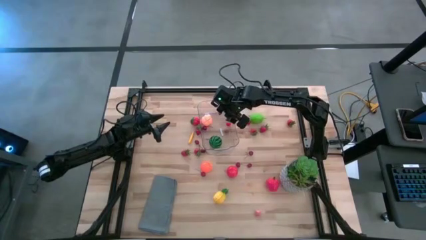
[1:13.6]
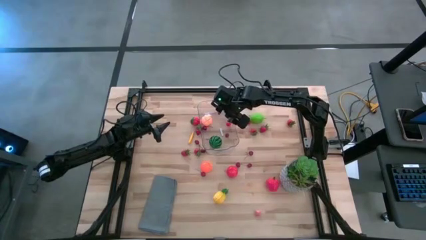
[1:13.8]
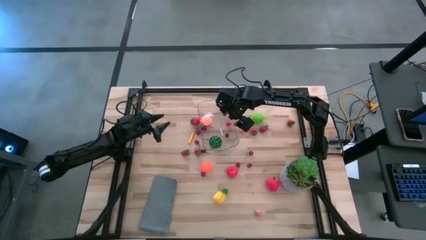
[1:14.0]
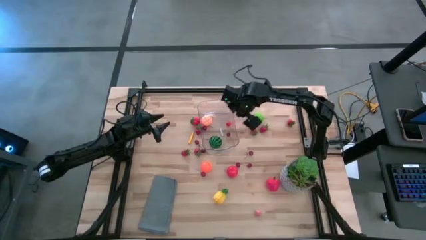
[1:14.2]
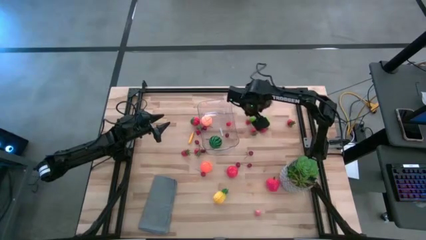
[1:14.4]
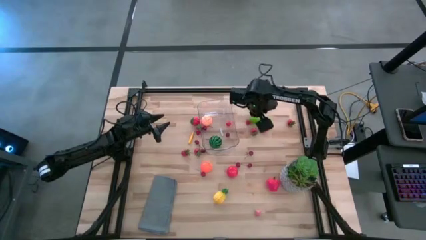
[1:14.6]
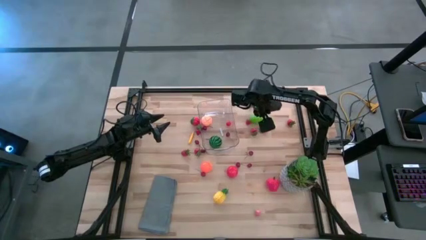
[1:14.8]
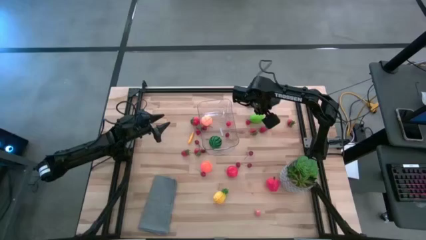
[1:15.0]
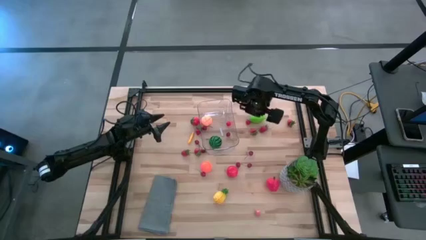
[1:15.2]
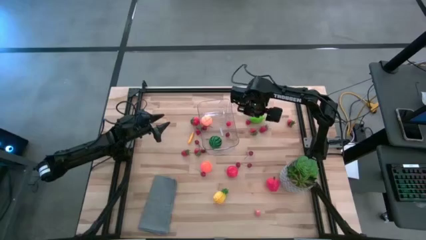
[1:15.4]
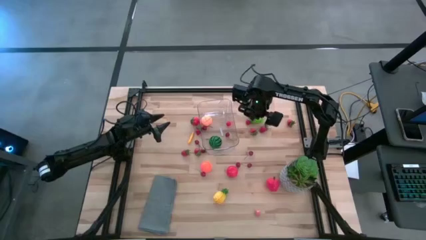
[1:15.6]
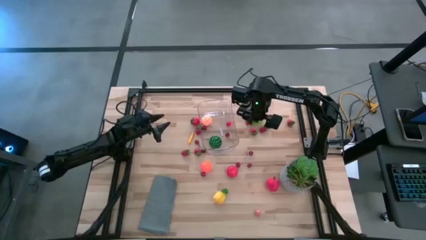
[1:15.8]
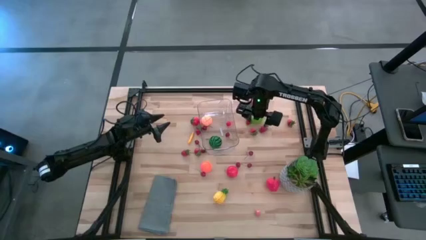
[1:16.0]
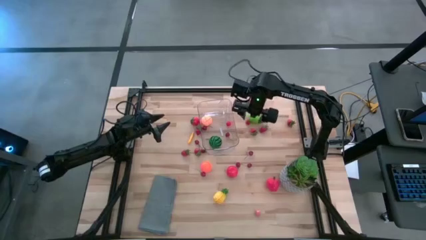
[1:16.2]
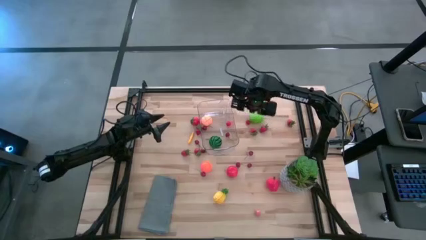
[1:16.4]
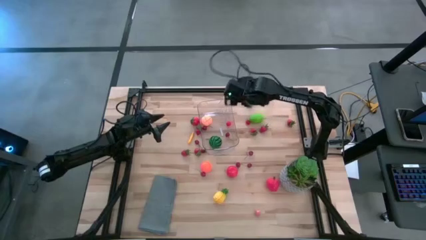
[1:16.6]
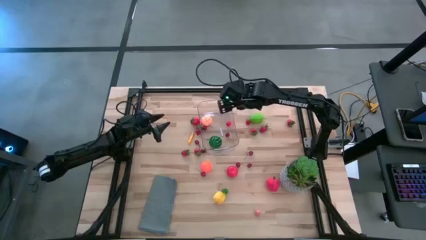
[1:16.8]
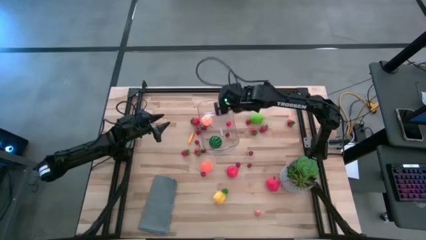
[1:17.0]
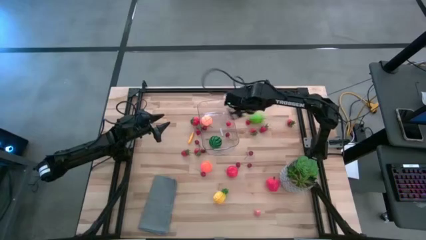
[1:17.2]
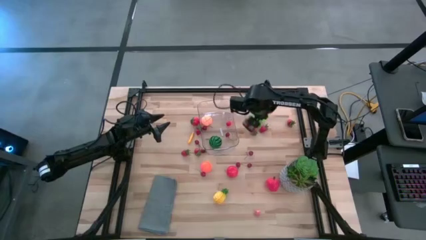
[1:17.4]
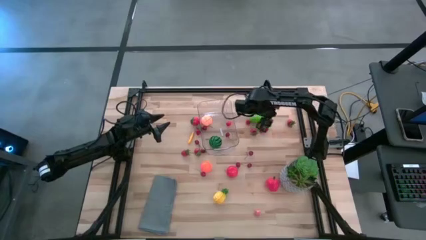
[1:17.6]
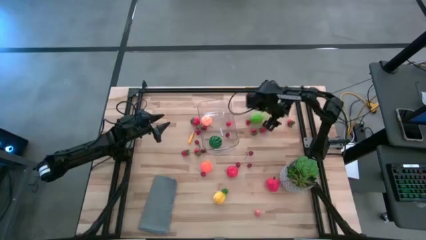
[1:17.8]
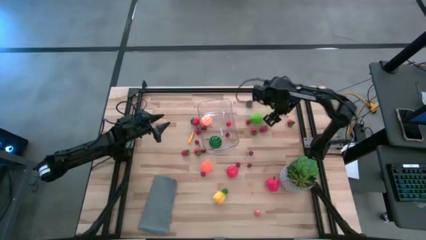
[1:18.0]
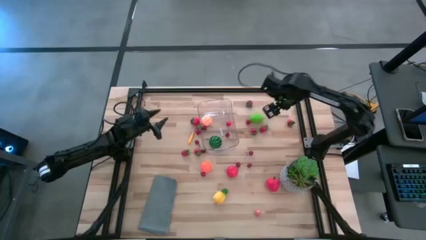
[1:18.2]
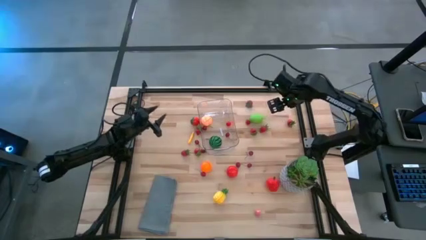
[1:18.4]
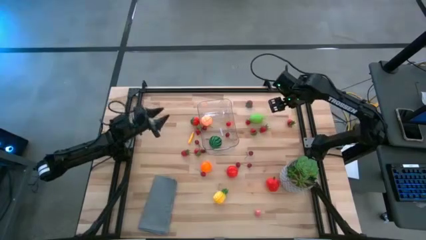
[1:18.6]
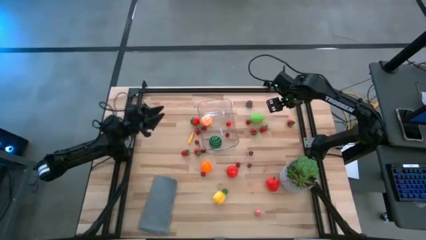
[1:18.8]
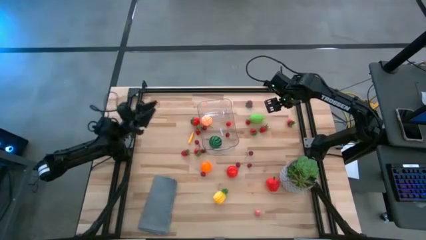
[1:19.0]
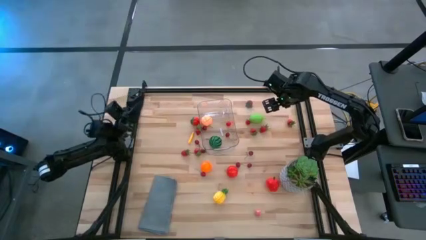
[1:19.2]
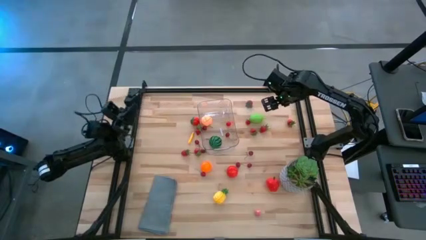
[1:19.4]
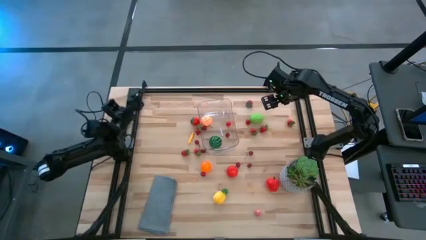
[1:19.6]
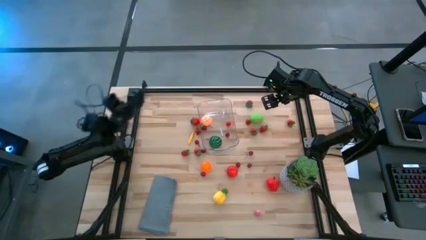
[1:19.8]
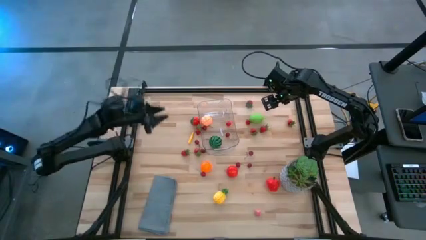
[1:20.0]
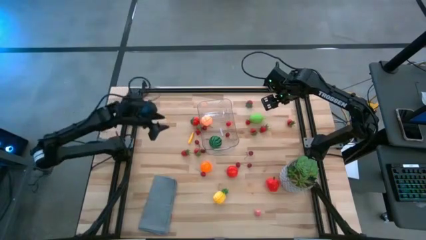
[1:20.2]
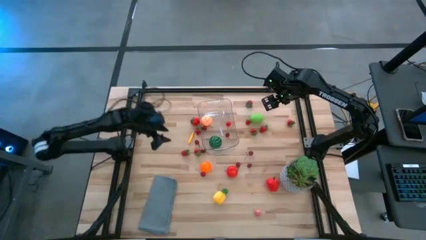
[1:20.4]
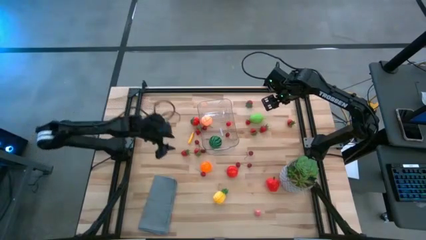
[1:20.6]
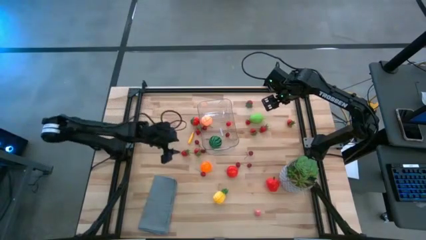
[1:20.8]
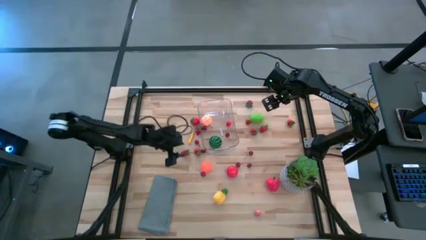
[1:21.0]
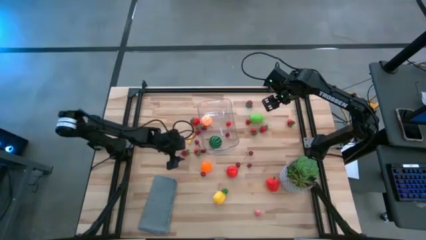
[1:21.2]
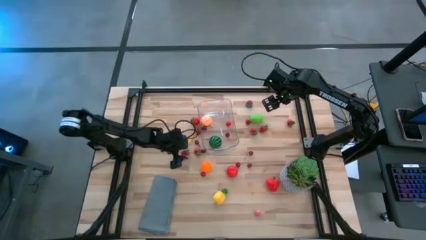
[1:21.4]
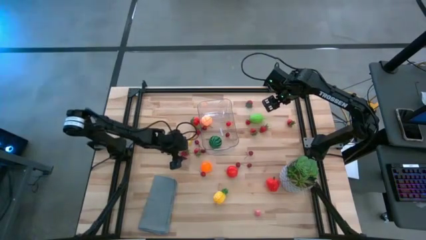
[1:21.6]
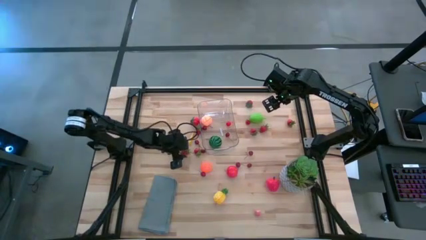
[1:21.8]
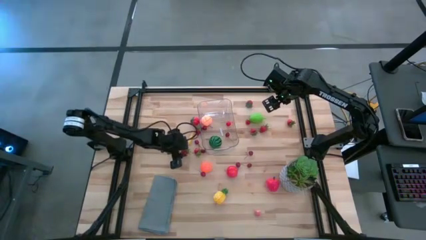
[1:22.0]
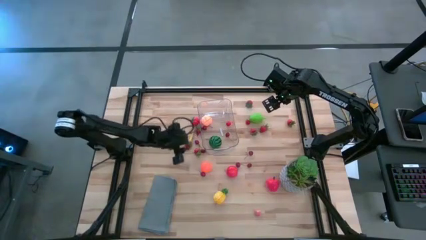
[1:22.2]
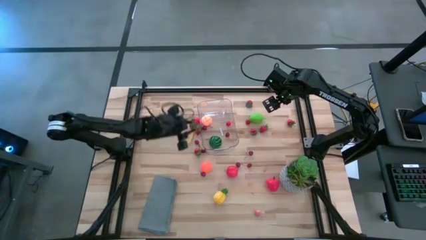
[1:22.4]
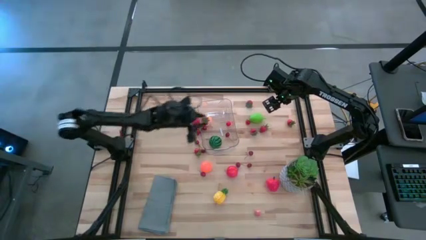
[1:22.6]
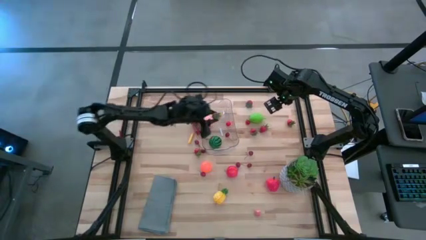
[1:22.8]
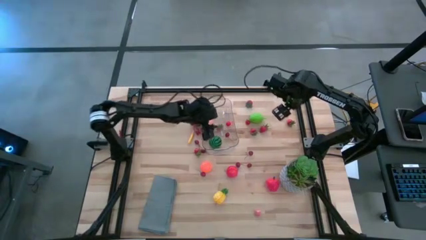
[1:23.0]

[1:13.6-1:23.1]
Task: Pick and placing Produce into tupperware
Put the red strawberry into the transparent container

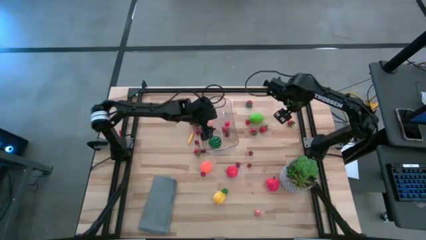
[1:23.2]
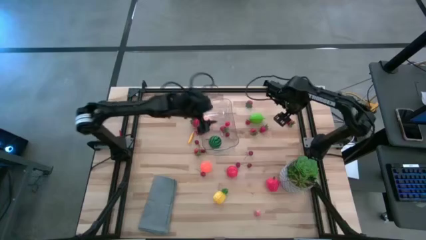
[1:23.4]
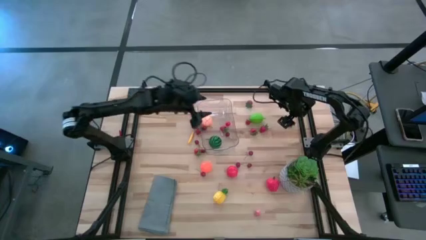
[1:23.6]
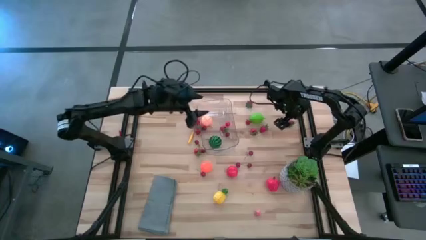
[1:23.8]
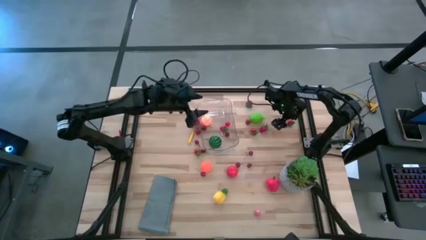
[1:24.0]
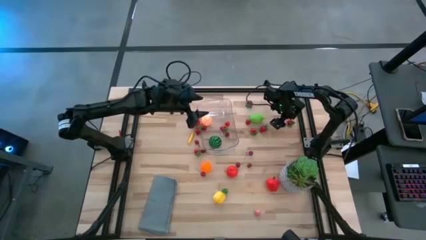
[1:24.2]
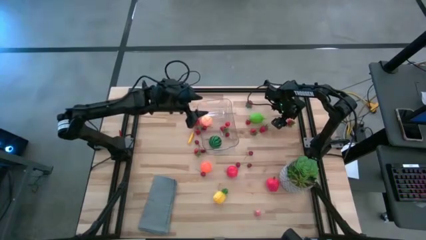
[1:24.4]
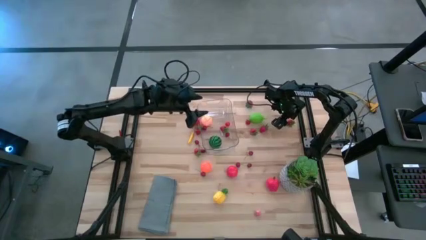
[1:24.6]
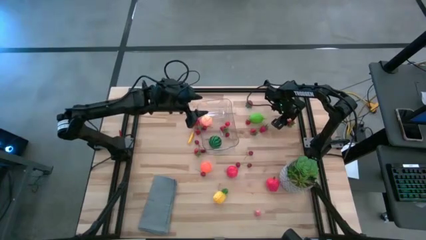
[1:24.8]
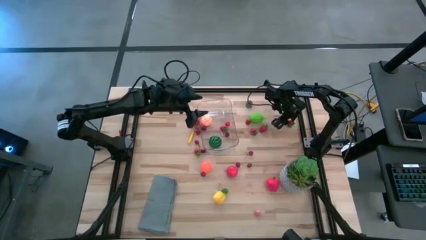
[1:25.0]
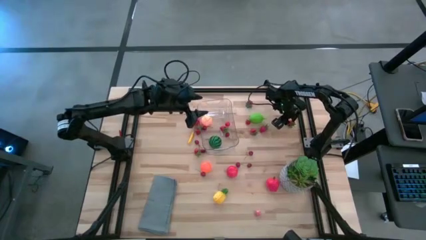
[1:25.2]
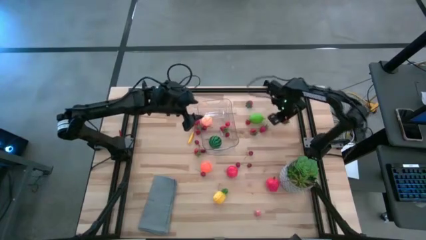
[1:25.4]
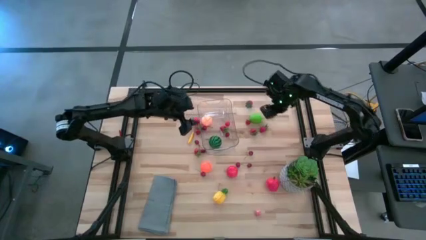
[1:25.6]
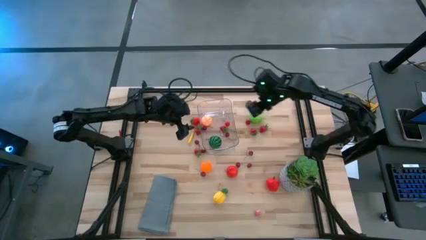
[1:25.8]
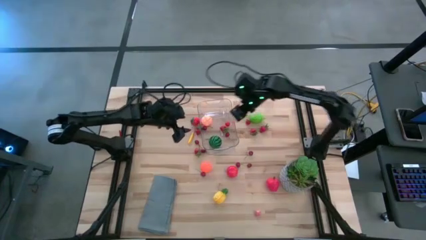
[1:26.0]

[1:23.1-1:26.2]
Put the red strawberry into the transparent container

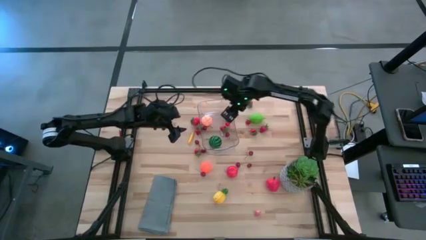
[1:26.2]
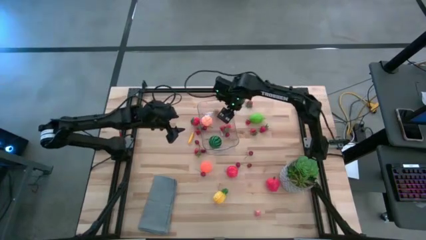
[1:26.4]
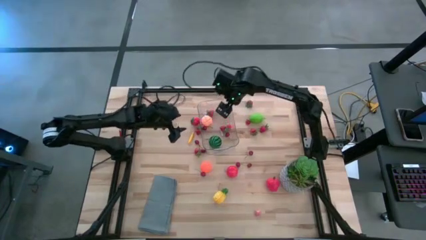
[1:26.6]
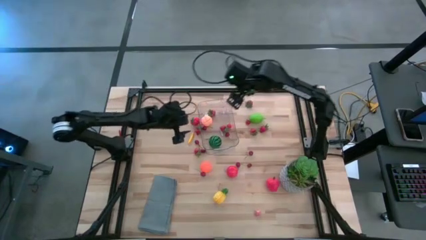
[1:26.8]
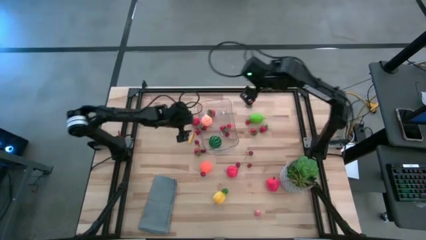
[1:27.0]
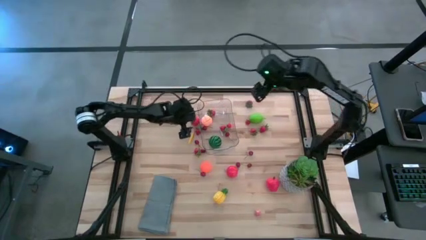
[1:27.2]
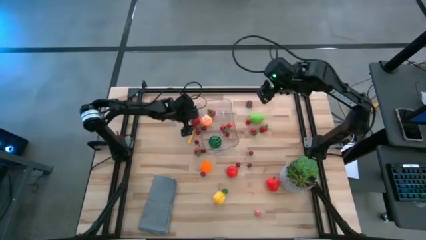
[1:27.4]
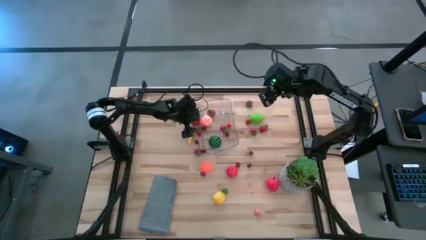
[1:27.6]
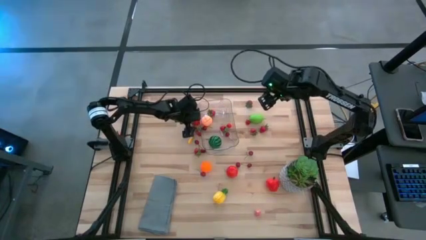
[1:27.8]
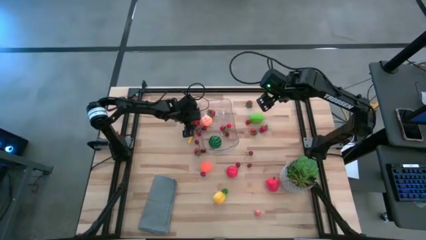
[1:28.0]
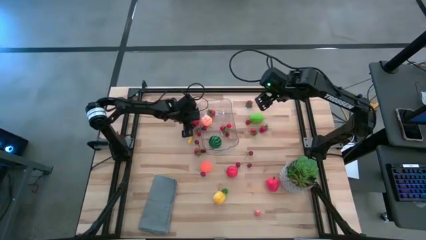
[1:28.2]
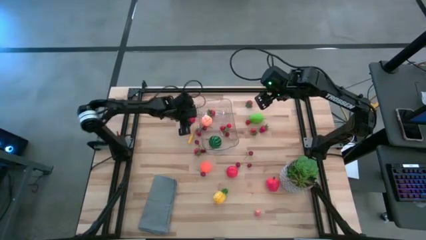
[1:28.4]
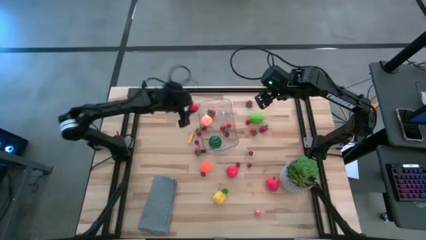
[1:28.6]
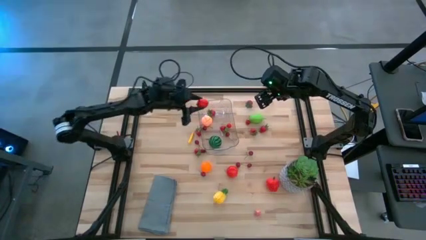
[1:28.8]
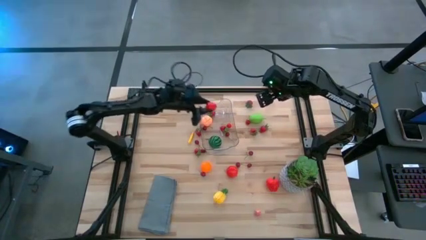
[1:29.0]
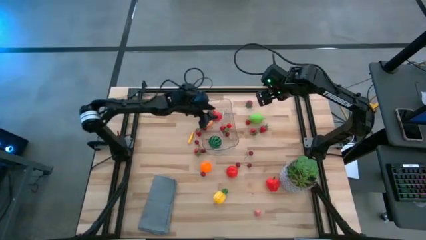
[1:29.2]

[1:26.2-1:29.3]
Put the red strawberry into the transparent container

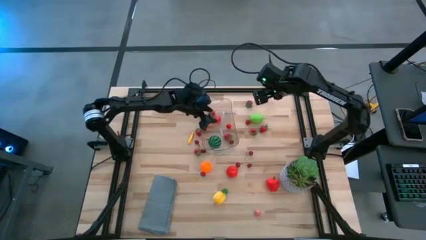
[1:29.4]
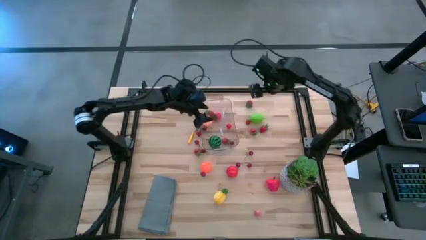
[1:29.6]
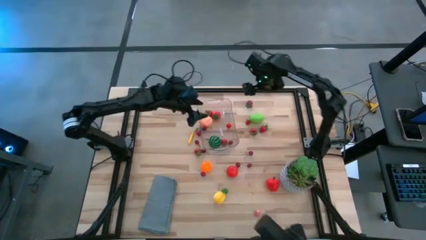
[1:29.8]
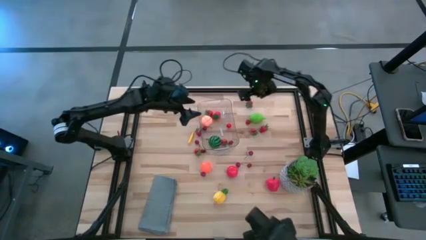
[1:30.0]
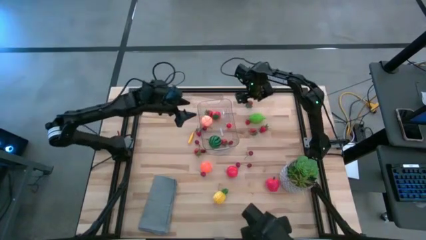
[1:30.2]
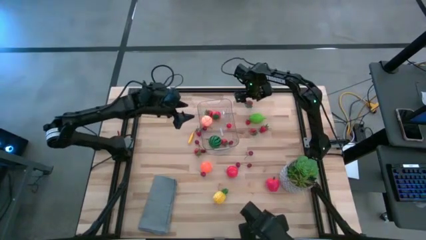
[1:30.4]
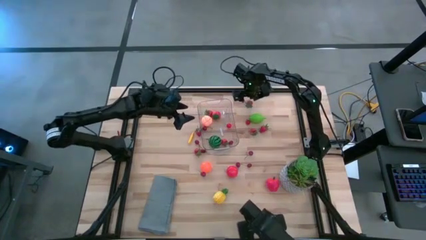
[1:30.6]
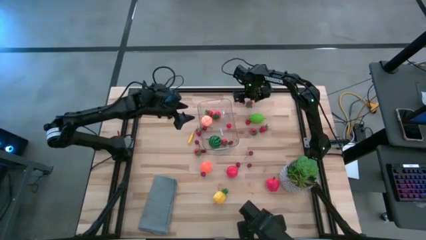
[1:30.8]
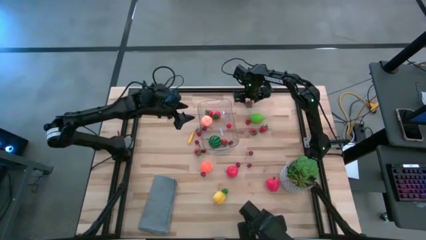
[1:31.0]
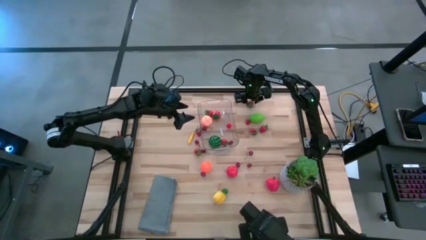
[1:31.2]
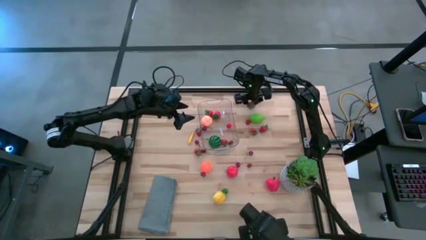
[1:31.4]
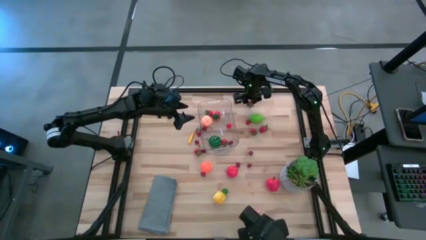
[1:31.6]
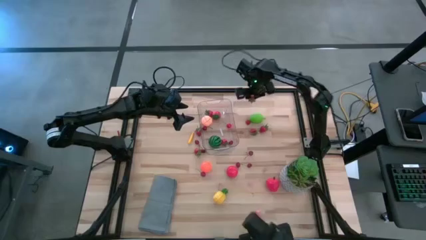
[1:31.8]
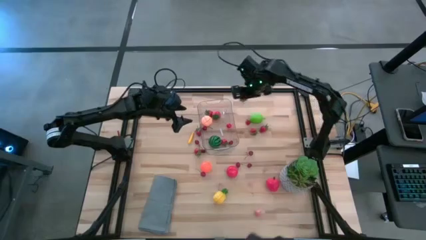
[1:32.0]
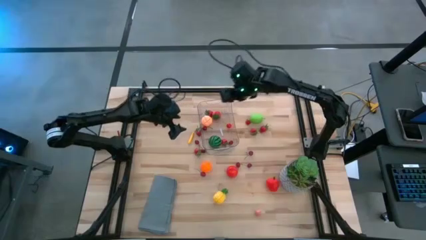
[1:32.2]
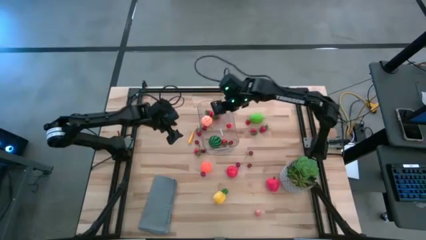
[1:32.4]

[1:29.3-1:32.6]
Put the red strawberry into the transparent container
